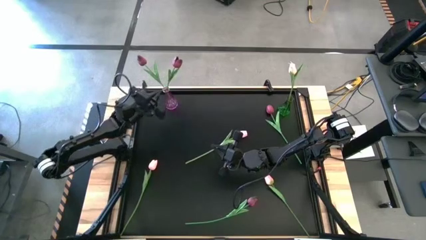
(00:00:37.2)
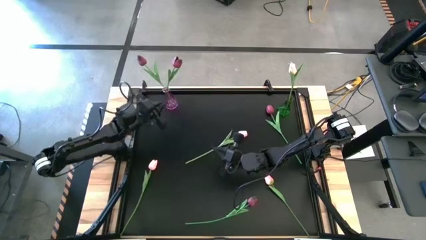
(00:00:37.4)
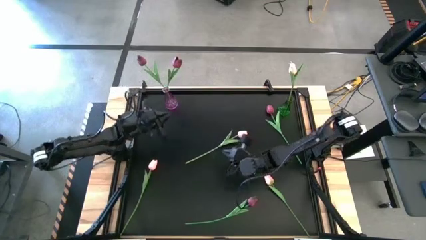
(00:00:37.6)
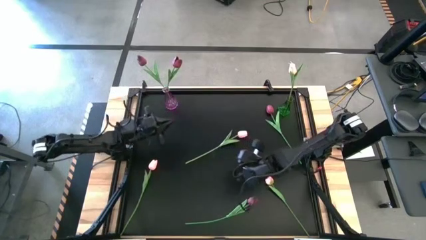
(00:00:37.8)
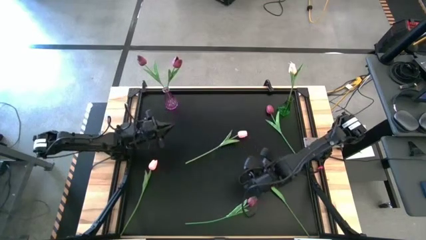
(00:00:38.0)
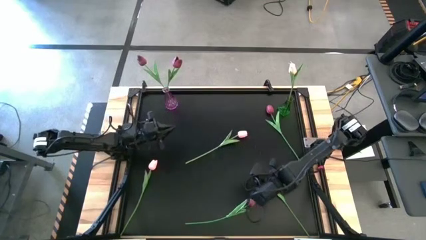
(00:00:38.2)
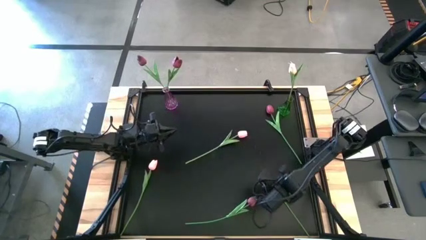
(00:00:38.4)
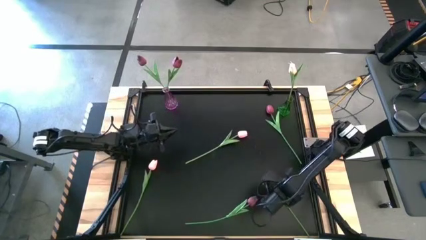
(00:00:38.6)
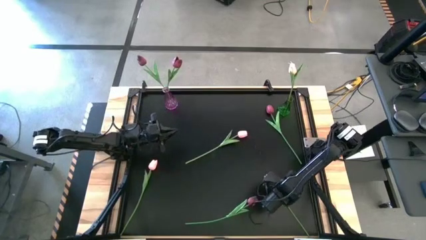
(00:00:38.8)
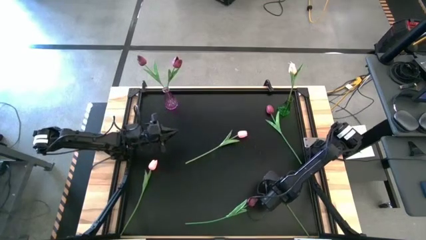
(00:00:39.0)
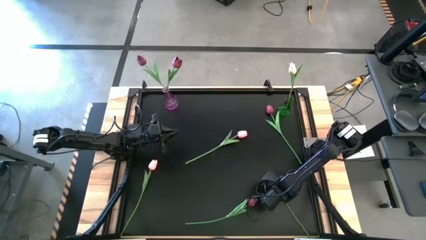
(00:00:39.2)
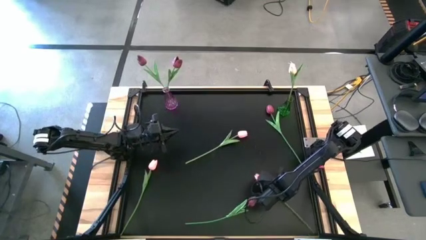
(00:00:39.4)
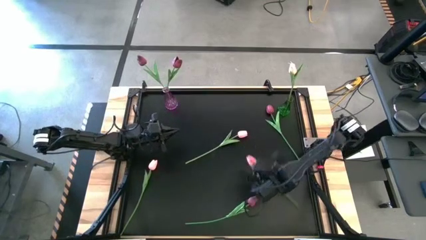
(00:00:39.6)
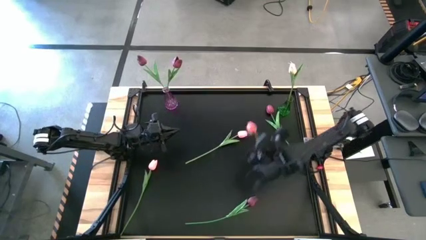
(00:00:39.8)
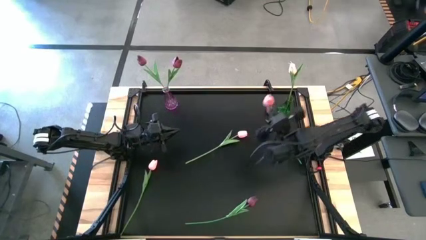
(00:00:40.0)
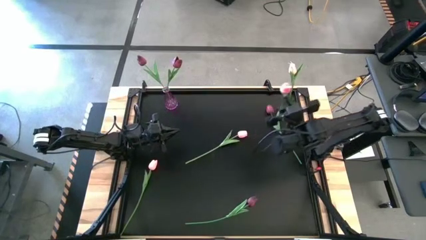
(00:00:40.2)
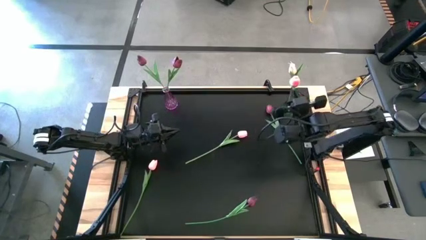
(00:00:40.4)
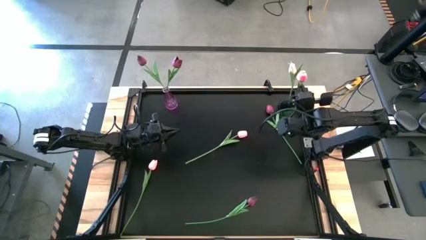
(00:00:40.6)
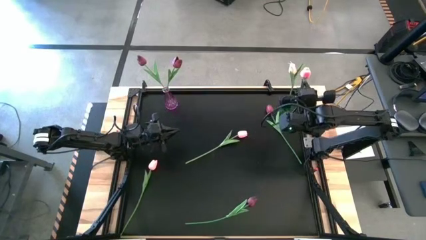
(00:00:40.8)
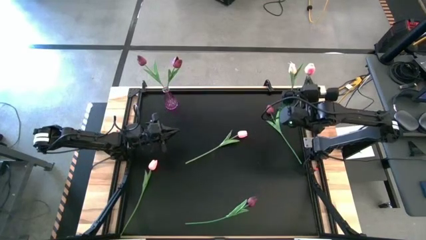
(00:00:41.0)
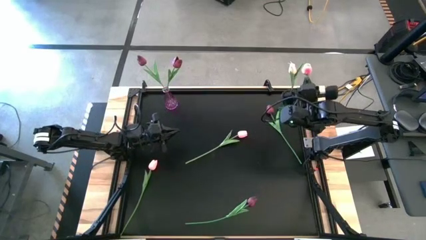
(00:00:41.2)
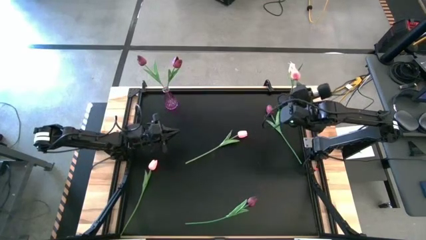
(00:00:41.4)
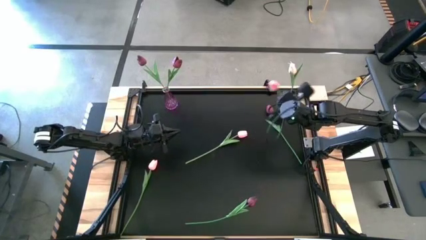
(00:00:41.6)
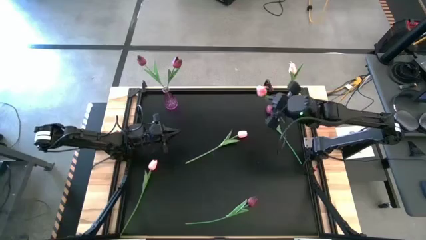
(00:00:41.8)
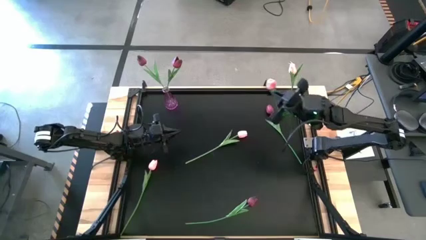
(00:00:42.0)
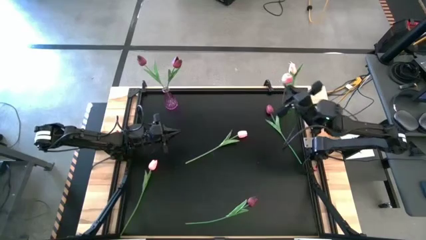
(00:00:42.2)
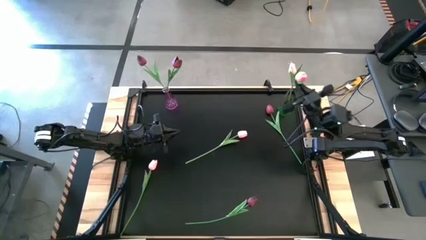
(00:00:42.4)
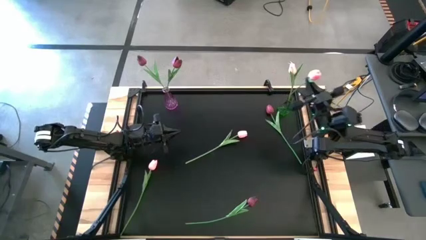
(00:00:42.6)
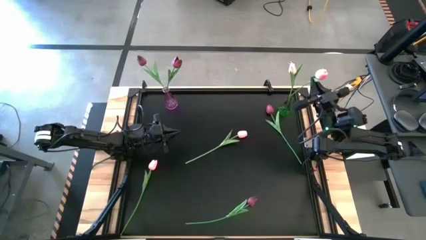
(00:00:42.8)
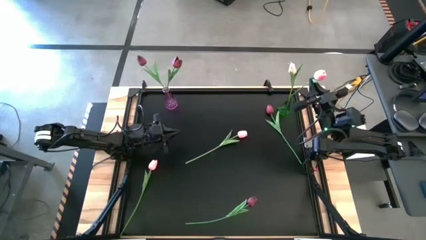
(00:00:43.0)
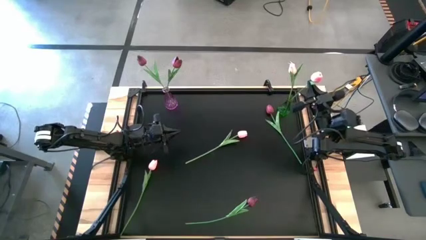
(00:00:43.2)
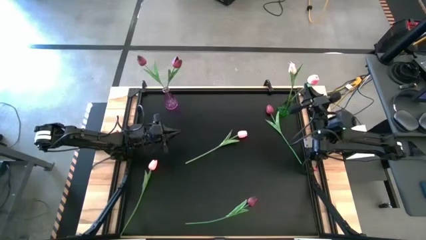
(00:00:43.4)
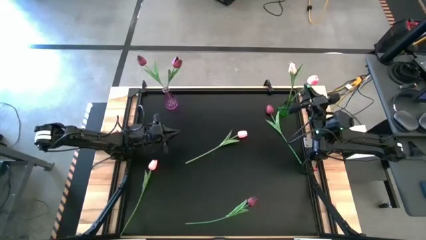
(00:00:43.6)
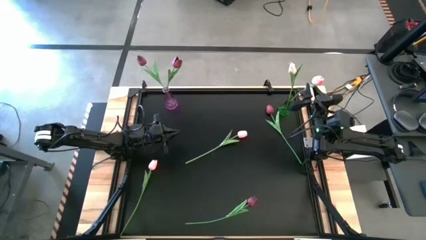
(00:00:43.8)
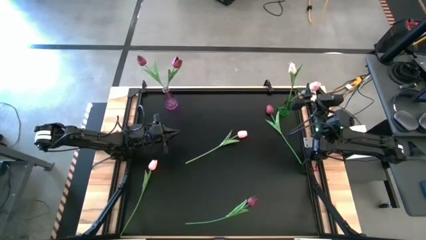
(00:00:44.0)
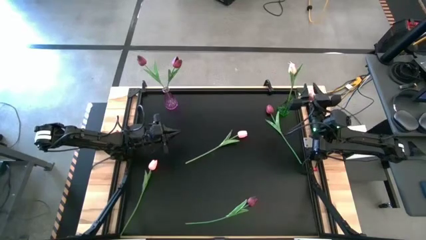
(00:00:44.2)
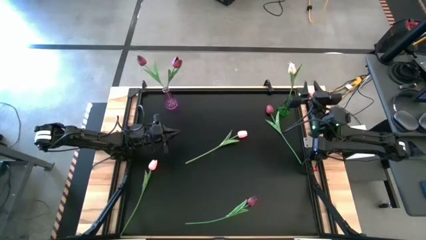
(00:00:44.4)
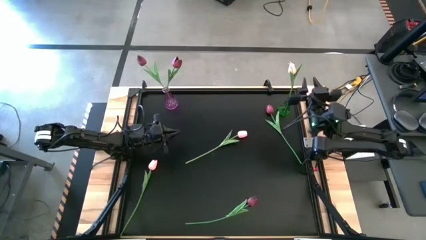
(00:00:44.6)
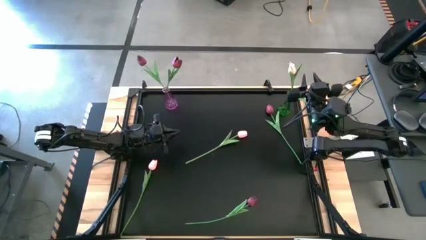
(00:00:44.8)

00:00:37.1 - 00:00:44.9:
Task: Sort flowers into vase by color
Put the pink flower into the green vase

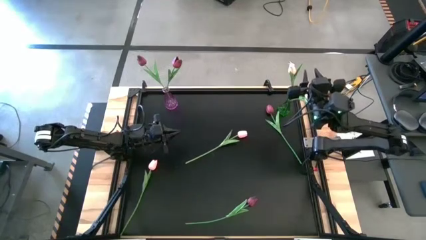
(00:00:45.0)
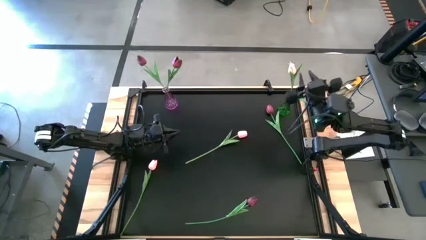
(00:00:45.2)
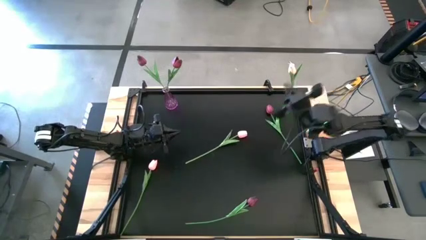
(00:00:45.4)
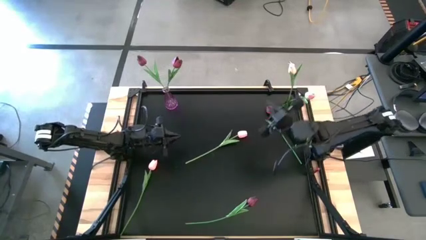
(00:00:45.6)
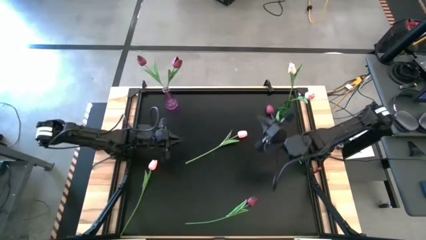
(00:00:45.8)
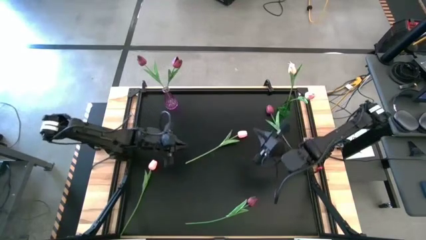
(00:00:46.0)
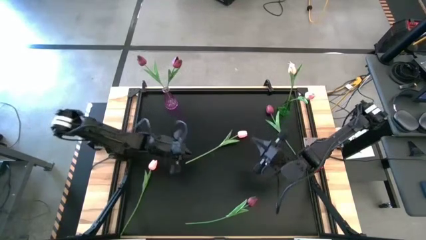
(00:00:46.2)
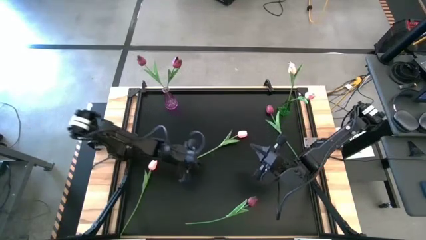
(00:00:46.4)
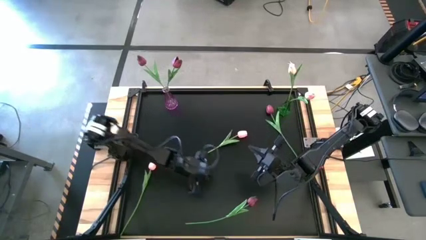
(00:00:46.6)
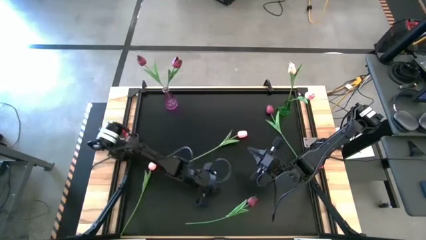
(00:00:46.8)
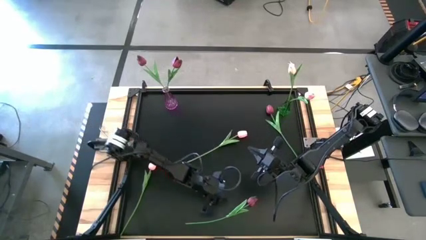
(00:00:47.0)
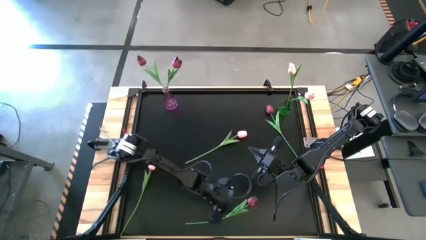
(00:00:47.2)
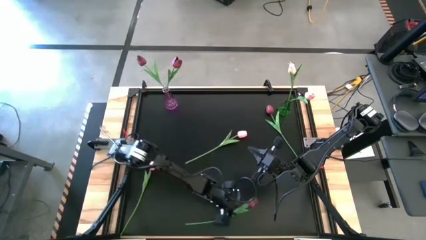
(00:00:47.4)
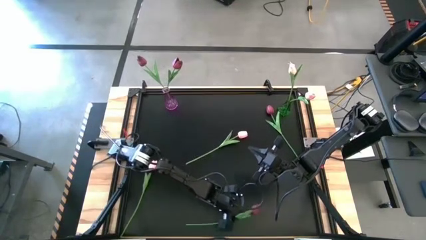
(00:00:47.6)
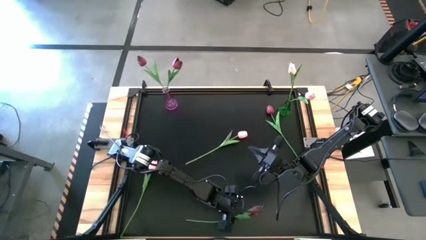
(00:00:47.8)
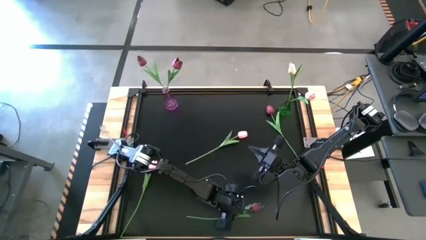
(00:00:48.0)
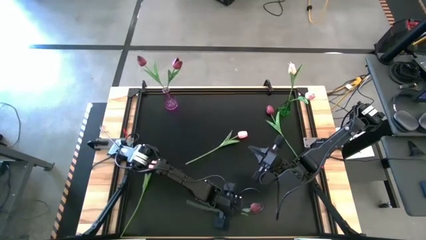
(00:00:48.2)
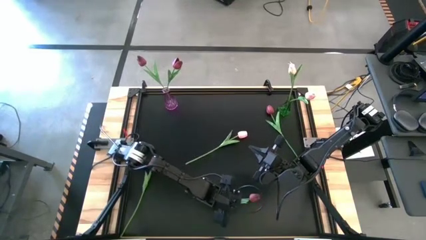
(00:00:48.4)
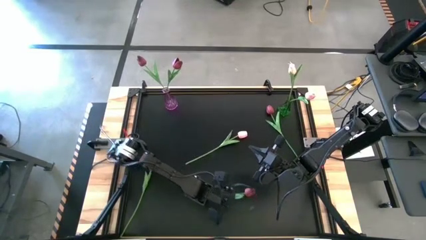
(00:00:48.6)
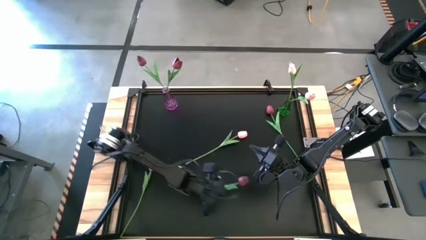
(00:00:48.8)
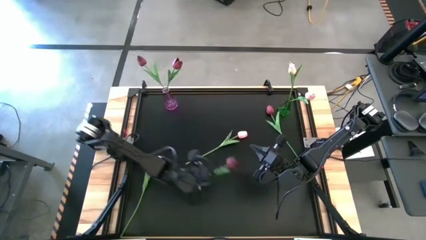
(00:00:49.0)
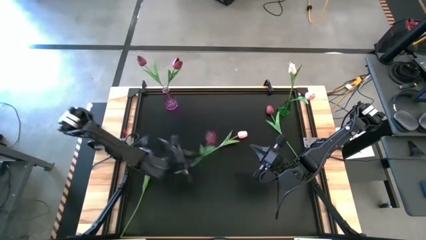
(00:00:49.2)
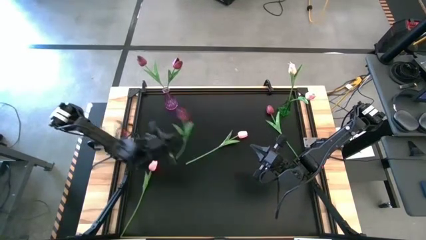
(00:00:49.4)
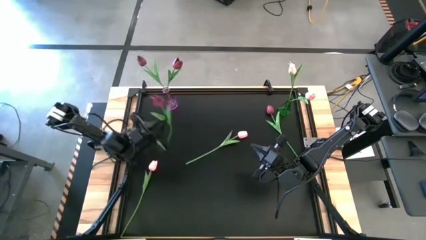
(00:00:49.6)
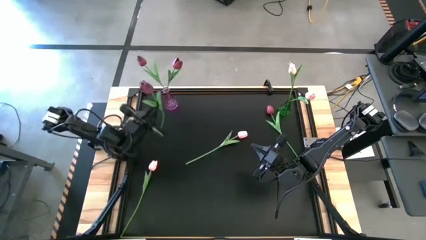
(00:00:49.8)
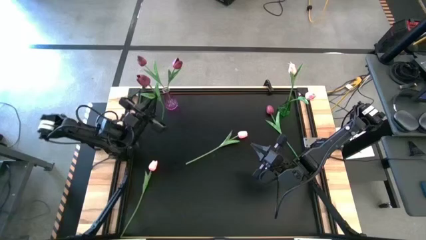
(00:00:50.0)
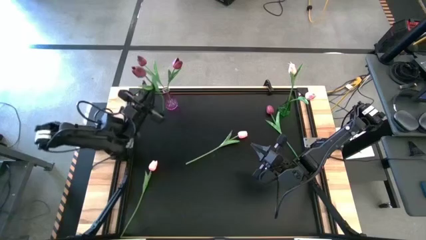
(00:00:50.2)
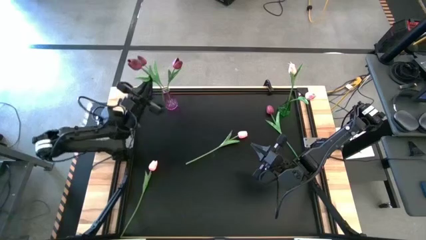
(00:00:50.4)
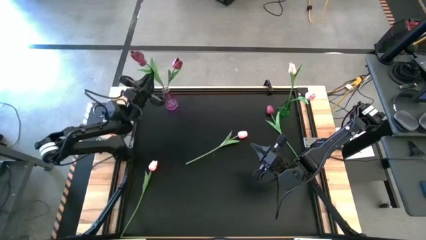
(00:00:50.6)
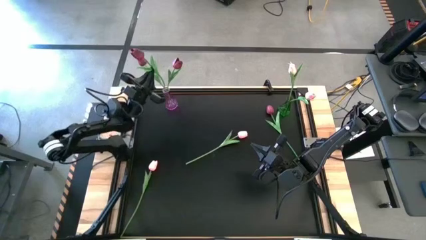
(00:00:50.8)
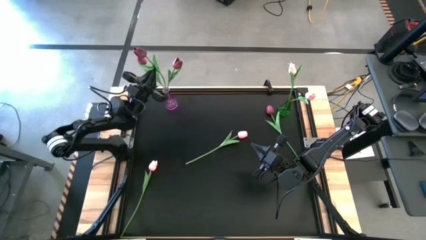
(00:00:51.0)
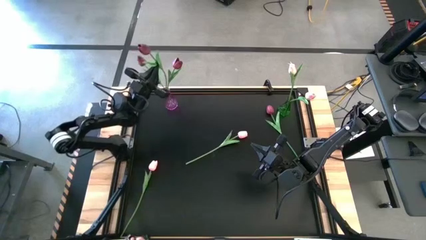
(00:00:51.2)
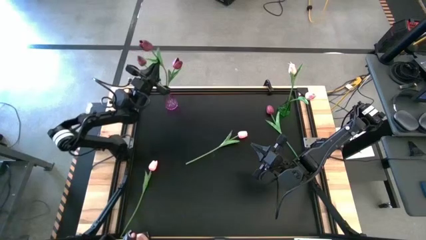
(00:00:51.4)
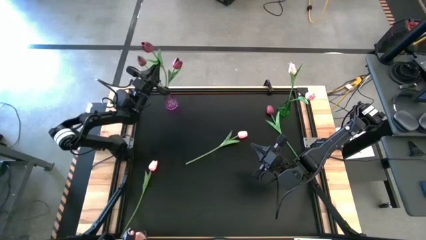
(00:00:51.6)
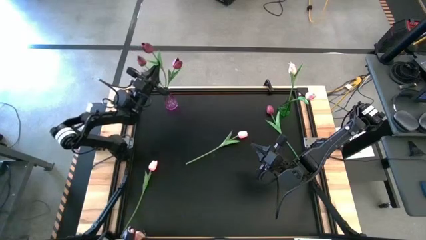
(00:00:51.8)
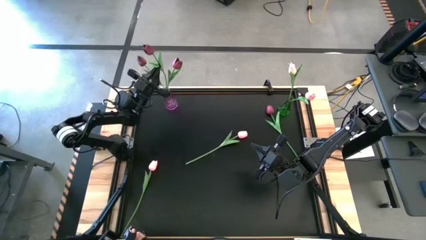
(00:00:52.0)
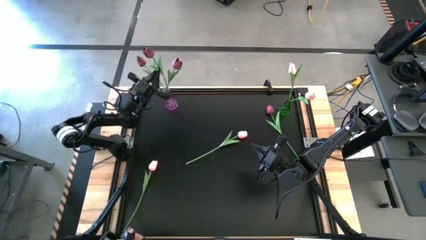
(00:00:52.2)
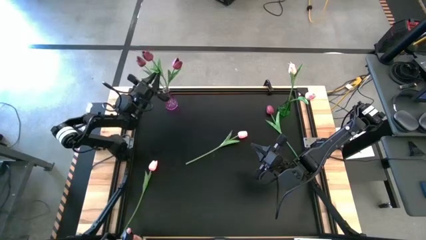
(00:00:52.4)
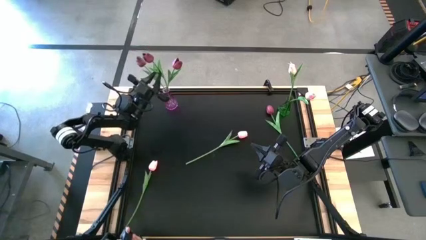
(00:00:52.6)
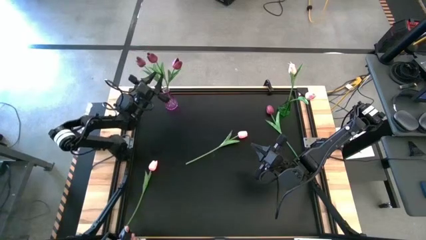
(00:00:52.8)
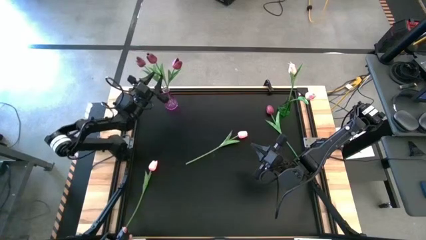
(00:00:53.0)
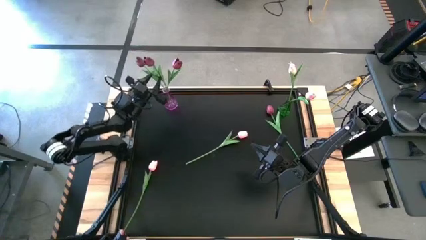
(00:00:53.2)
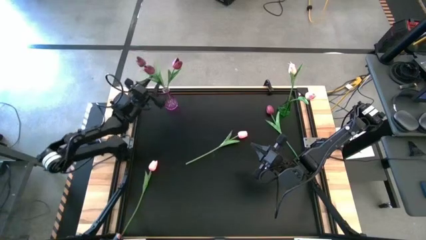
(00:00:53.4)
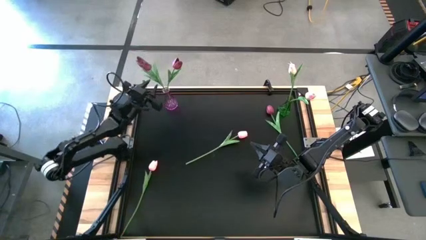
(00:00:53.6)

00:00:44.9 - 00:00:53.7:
Put the red flower into the violet vase
